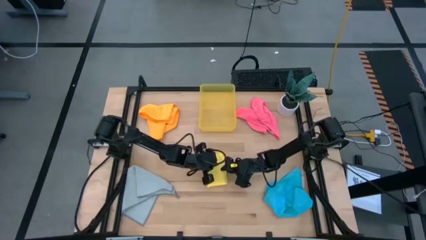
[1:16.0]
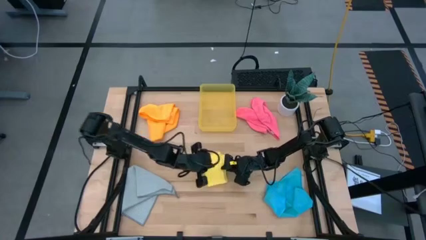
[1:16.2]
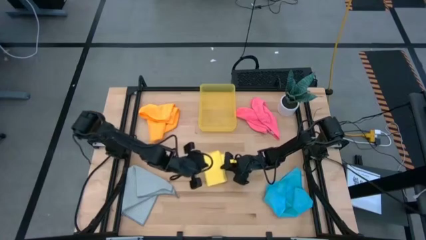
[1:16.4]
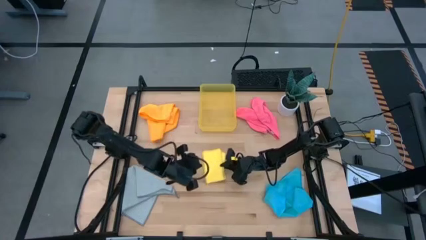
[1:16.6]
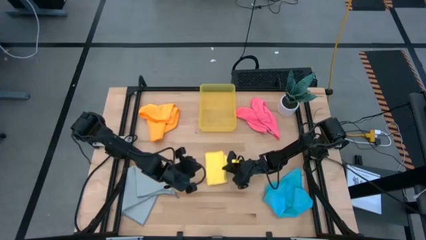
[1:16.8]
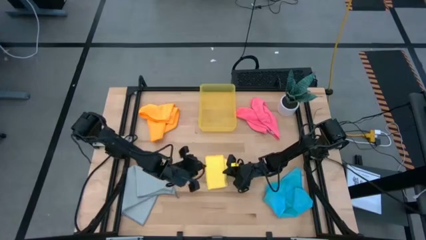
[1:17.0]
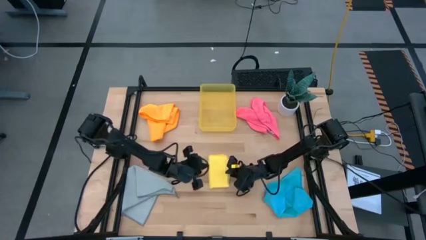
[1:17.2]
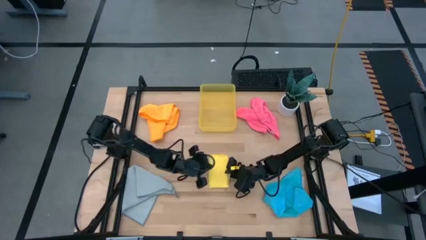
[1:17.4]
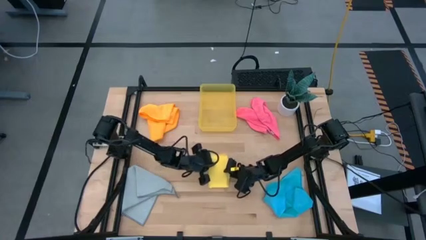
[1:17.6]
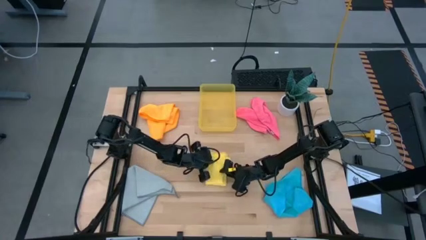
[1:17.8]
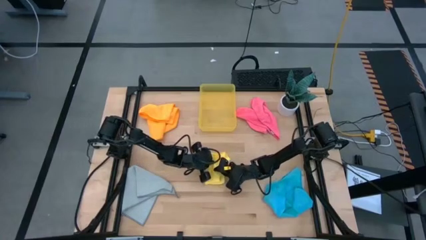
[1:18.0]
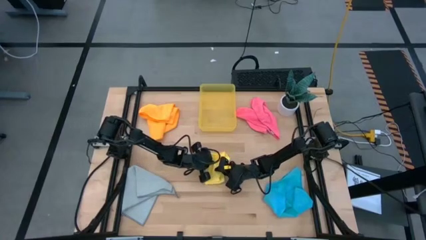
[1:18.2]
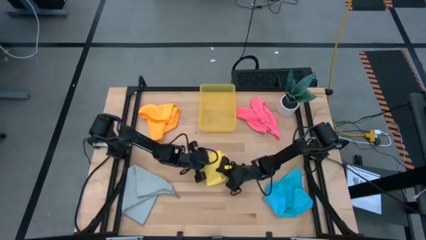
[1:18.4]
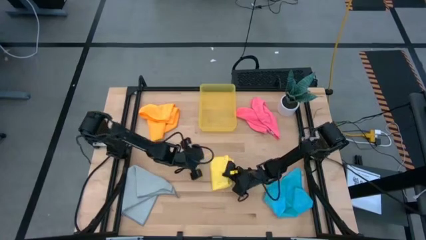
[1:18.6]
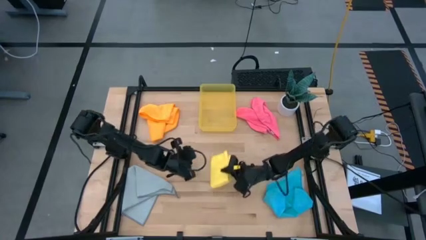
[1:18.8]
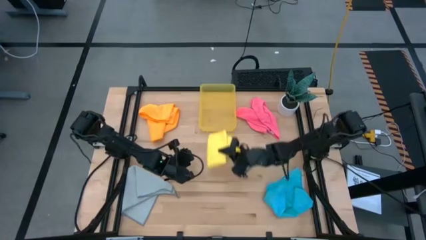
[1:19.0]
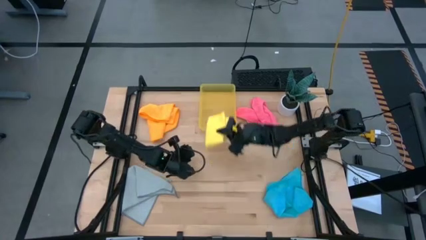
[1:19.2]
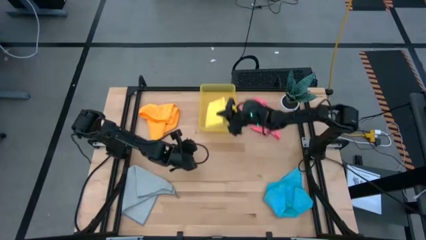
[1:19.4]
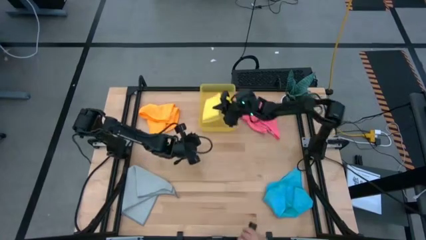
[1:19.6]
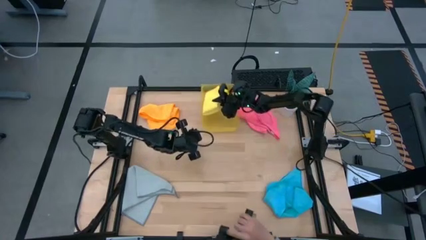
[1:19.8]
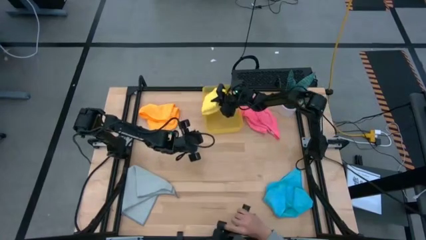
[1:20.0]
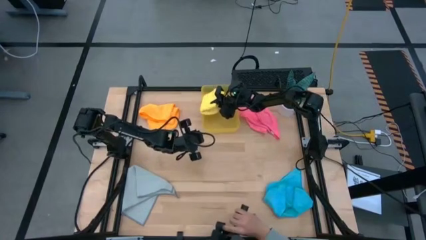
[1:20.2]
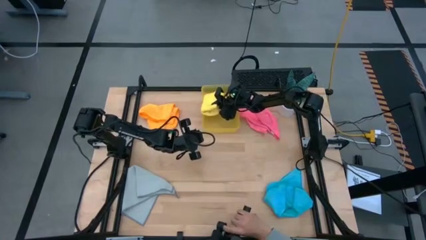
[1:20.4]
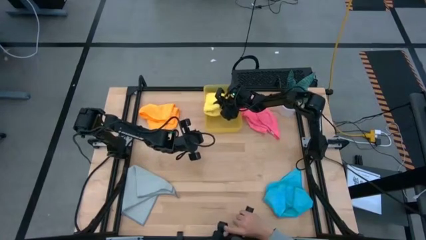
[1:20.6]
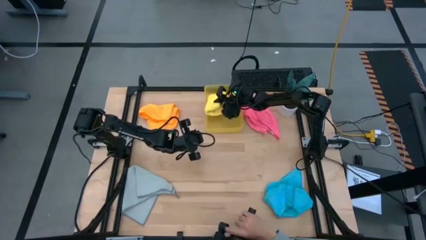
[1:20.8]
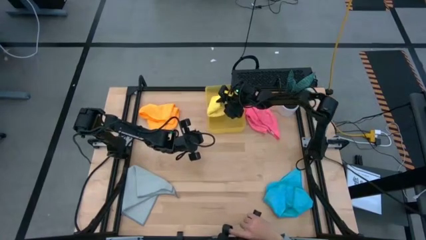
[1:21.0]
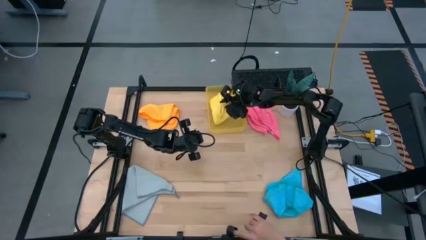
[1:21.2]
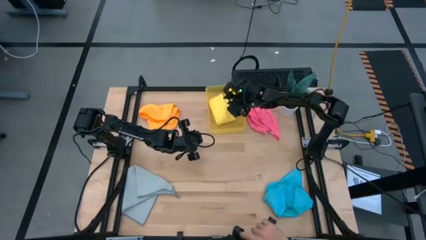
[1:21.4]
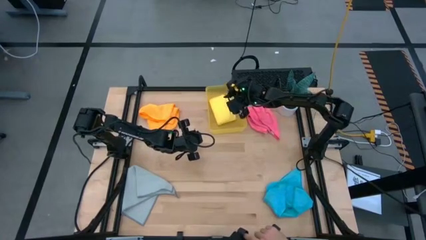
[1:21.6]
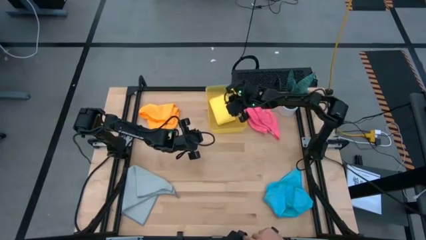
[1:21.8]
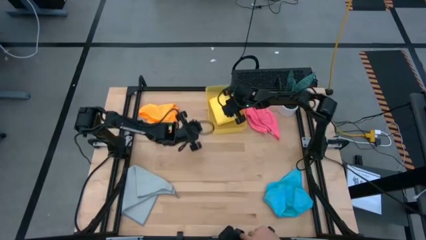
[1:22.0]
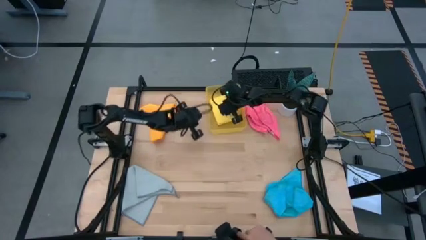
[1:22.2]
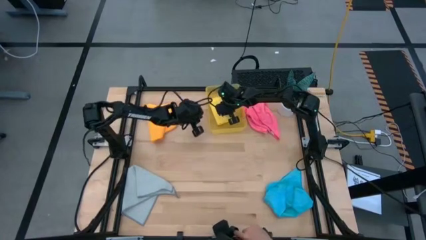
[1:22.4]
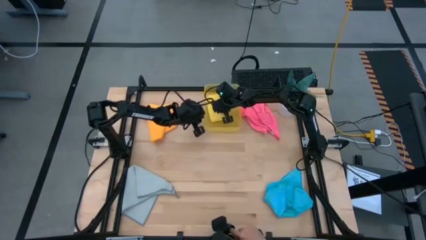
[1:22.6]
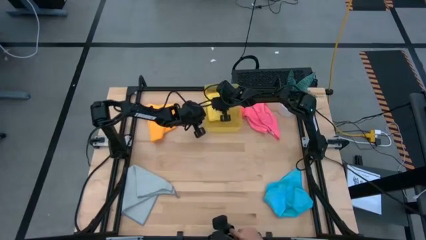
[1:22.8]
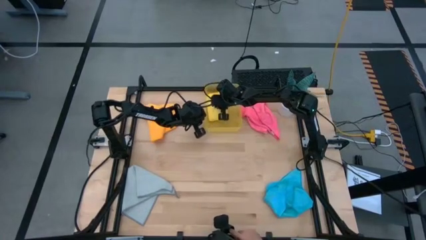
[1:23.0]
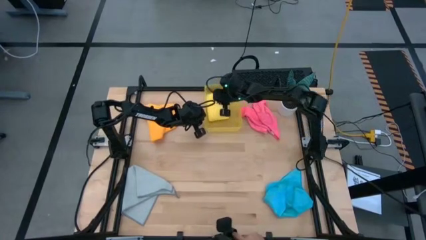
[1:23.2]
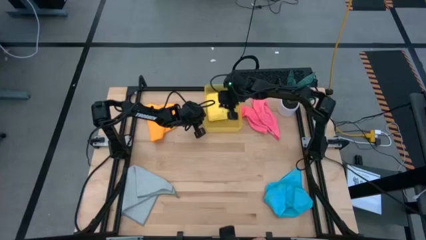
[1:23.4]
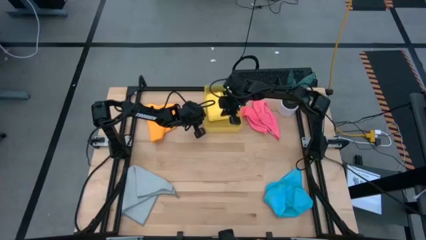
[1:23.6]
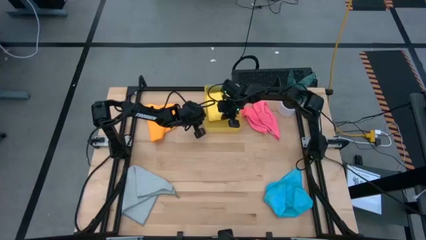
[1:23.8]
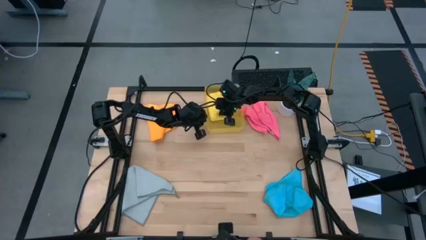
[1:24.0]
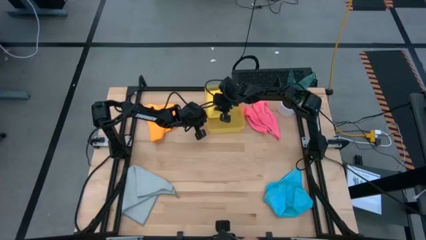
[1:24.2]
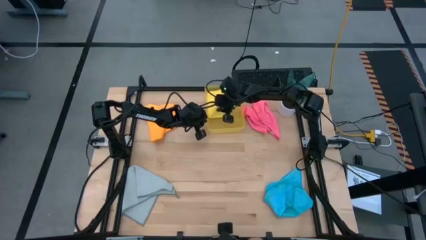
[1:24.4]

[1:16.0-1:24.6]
Task: Fold microfiber towels
Put the folded yellow microfiber towel into the yellow bin

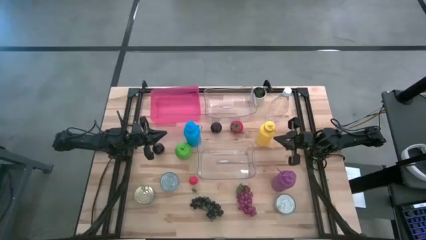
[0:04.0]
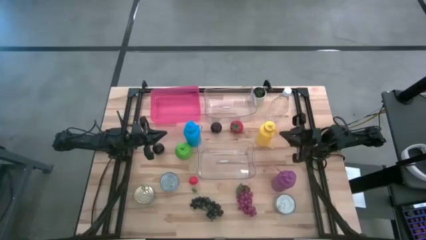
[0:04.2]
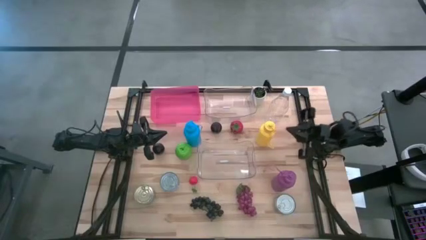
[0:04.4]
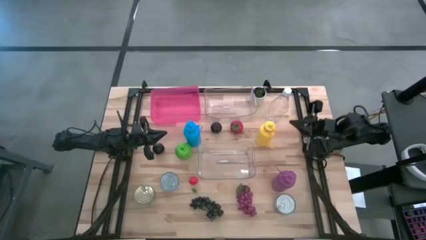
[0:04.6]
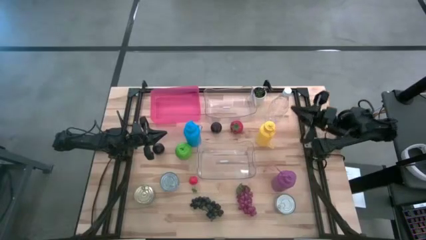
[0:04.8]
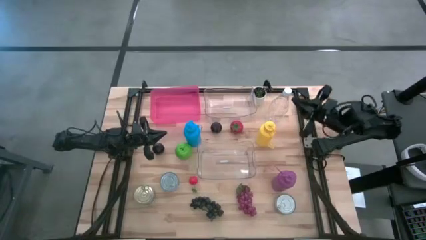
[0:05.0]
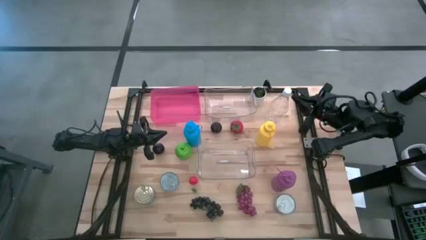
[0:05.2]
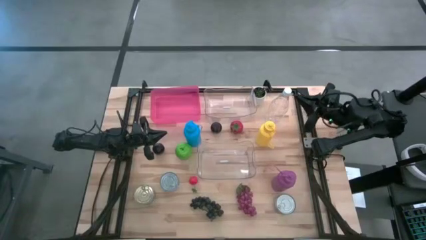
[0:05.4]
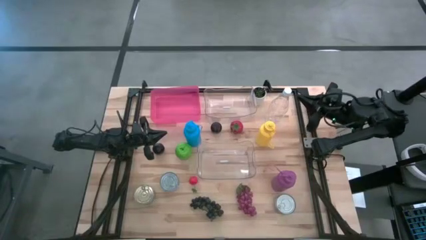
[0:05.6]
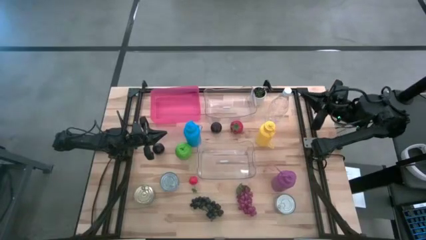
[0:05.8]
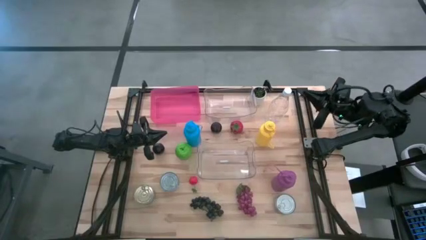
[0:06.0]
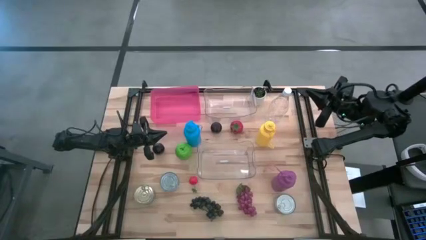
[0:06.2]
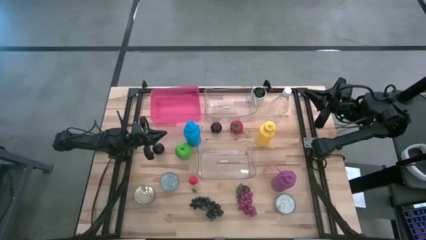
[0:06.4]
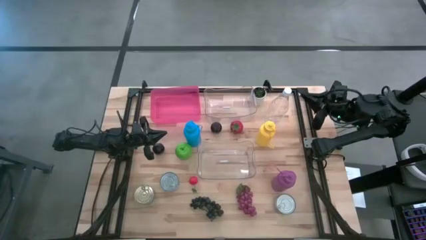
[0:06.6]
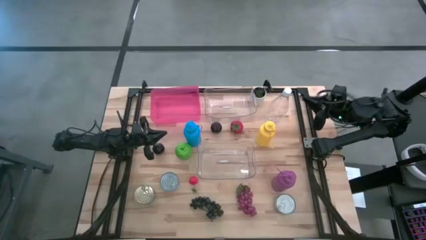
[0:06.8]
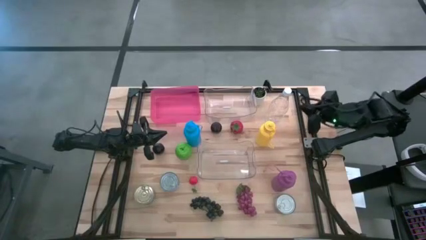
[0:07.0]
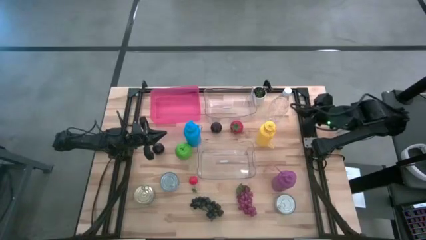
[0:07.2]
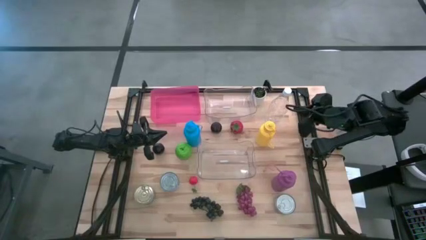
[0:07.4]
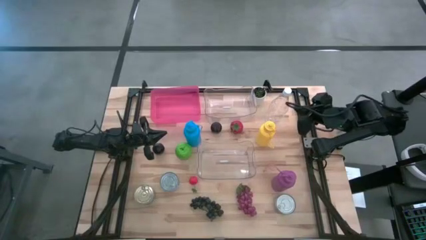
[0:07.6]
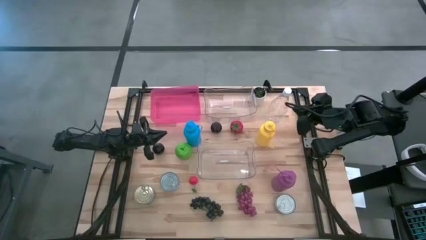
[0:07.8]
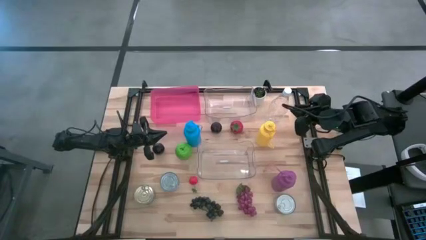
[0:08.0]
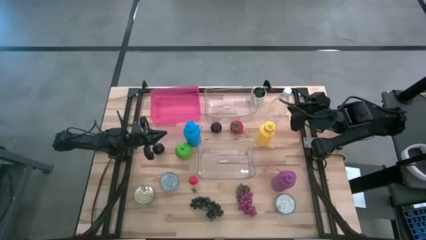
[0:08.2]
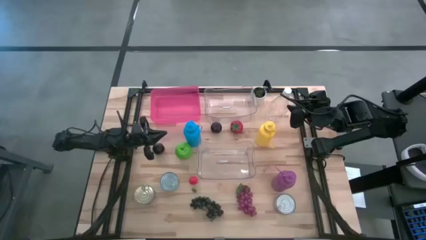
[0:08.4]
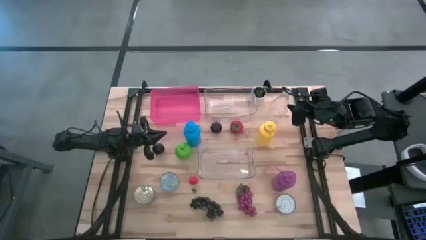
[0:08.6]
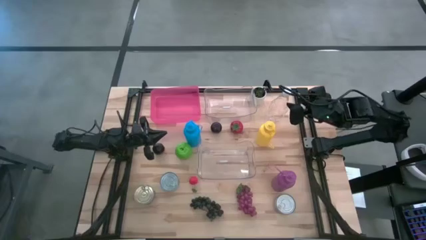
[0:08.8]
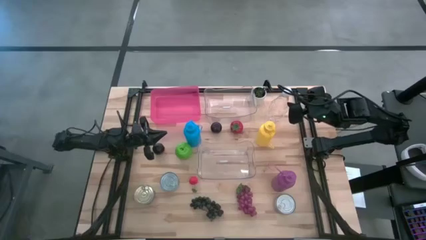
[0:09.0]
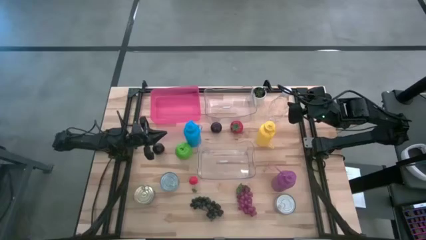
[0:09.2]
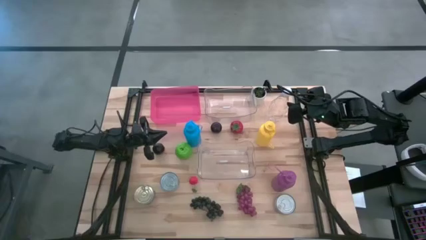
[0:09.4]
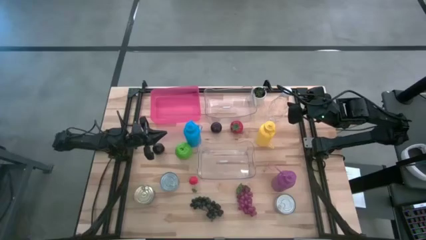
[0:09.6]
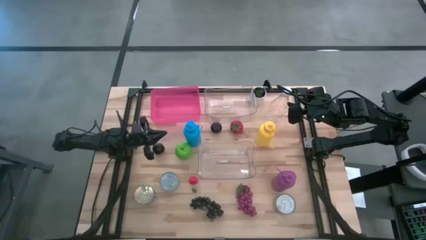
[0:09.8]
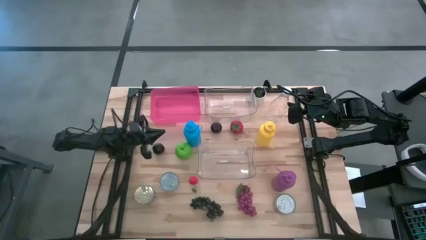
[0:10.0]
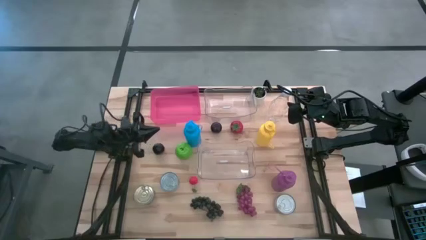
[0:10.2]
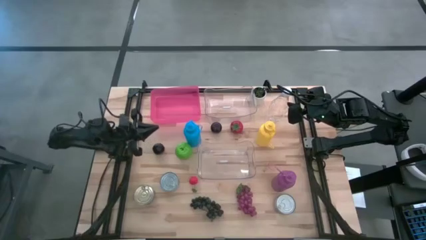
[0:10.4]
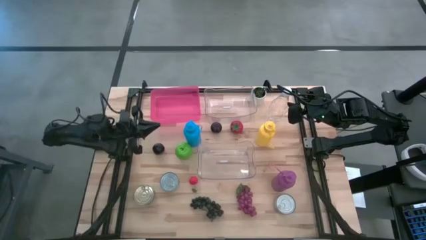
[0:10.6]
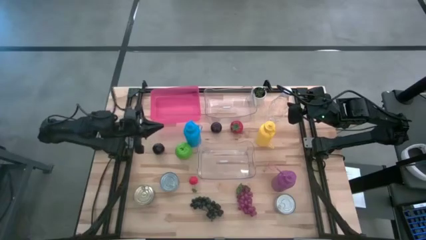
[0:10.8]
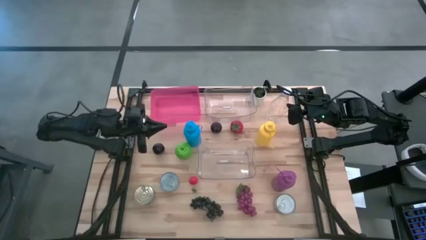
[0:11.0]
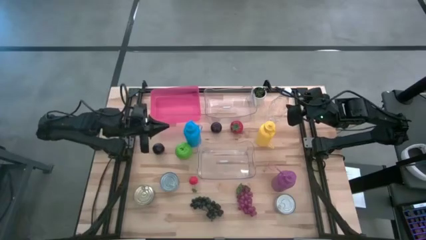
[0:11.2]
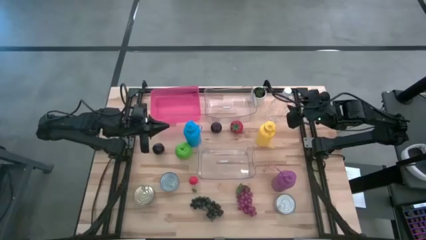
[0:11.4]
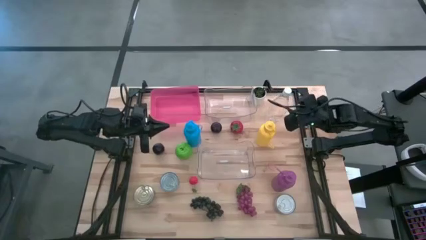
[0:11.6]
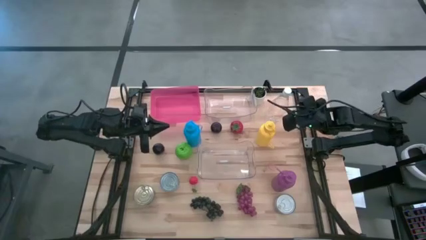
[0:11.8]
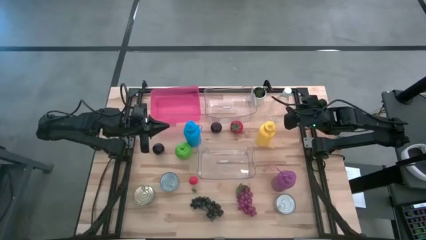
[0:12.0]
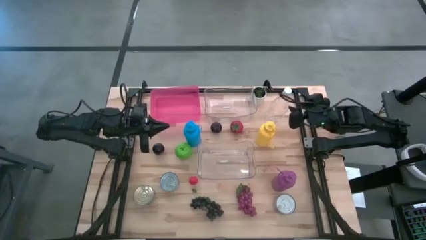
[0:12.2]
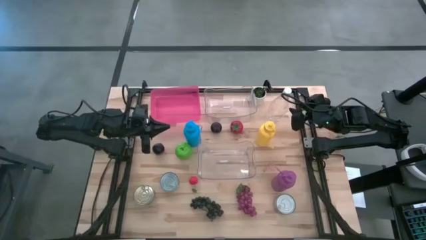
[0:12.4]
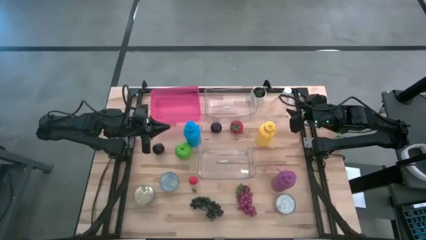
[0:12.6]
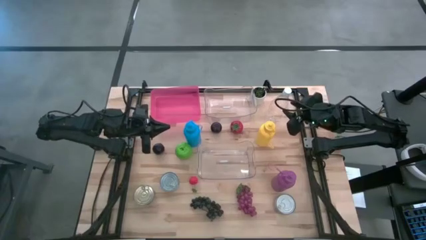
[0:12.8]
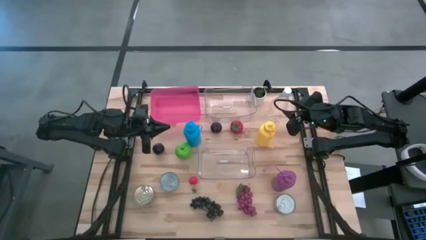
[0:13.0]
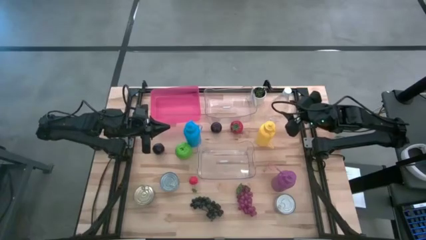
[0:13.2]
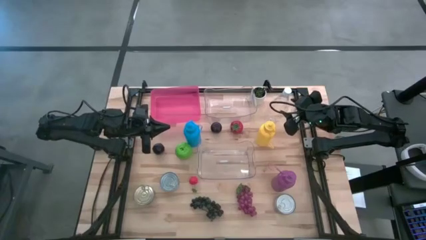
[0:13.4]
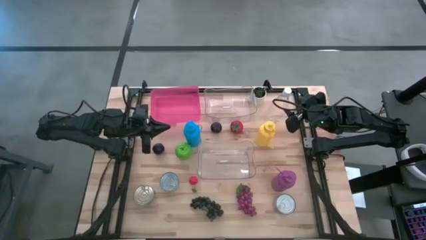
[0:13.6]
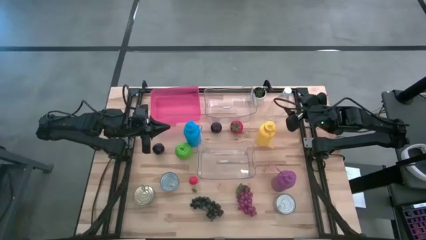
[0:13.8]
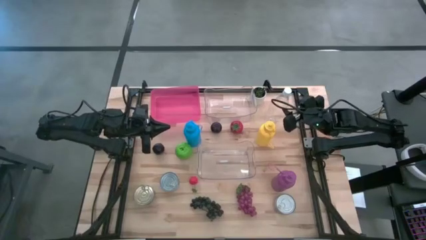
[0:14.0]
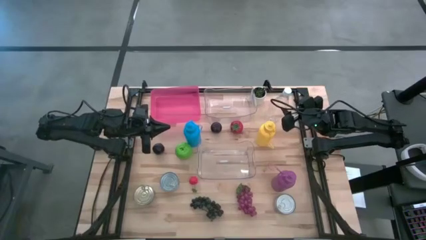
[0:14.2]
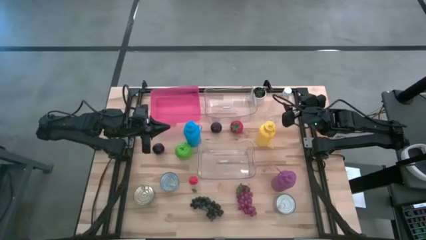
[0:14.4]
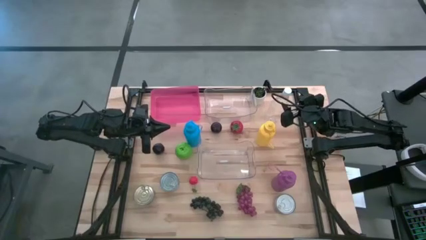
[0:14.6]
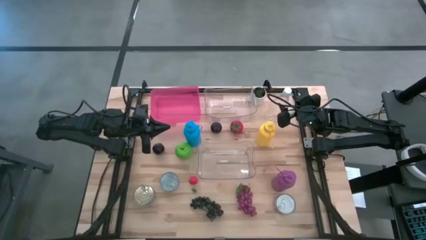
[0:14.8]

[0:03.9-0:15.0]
Task: Pick & Place Food Item
Put the transparent bottle into the top transparent bin
